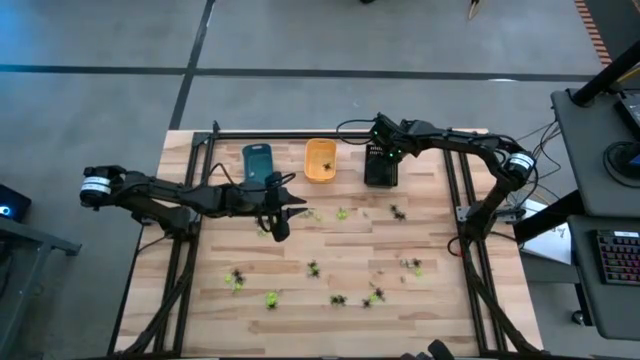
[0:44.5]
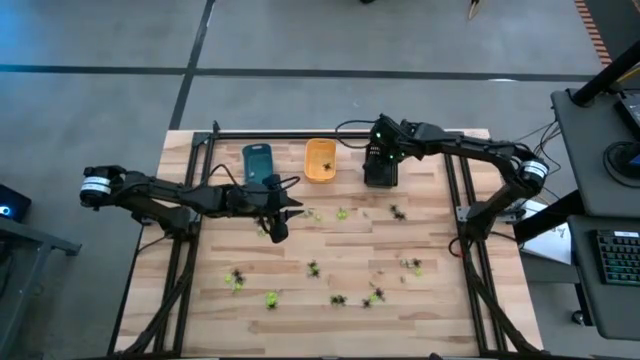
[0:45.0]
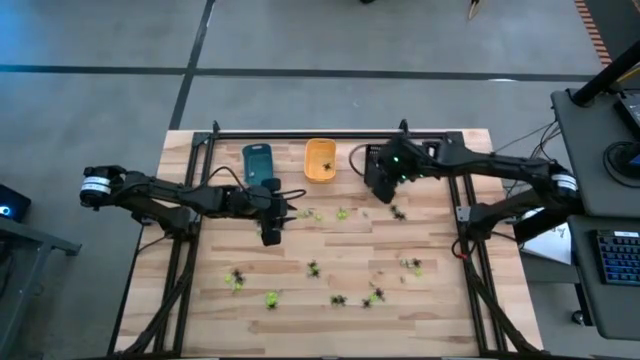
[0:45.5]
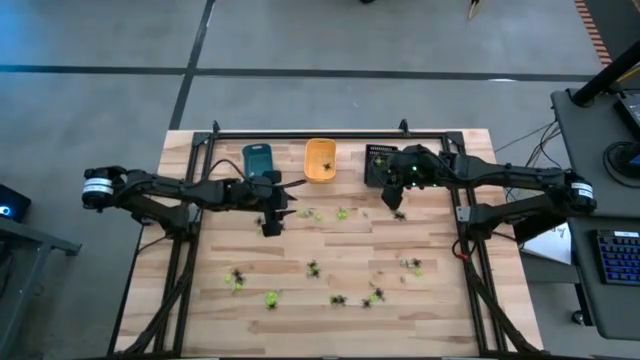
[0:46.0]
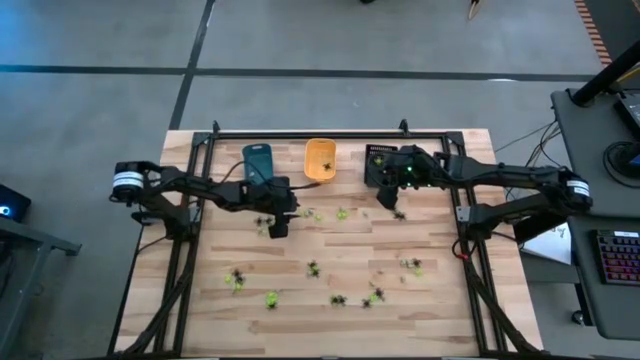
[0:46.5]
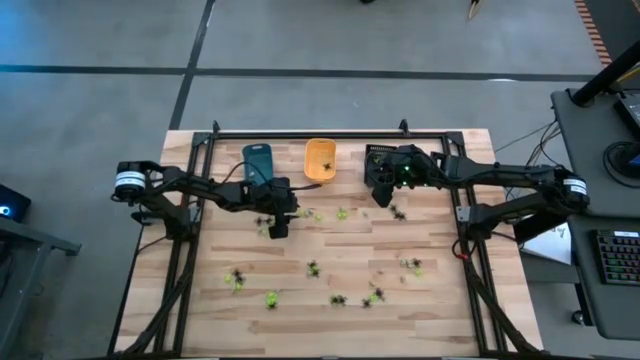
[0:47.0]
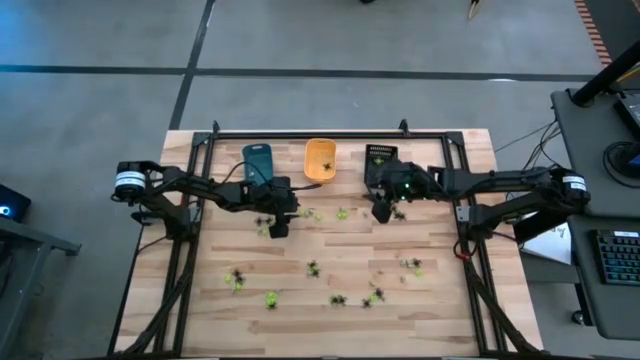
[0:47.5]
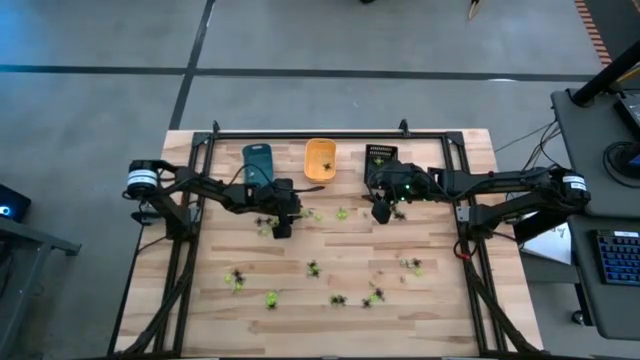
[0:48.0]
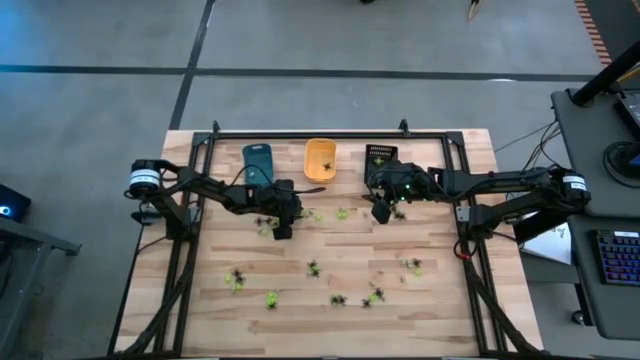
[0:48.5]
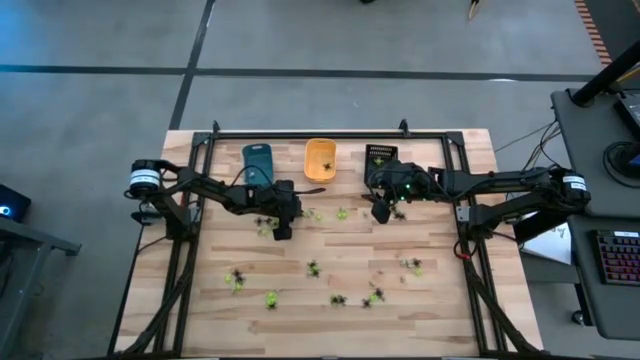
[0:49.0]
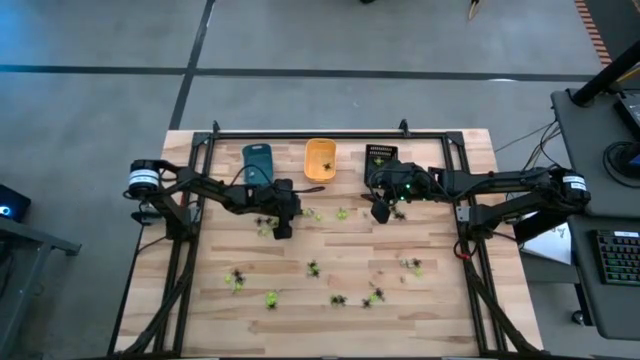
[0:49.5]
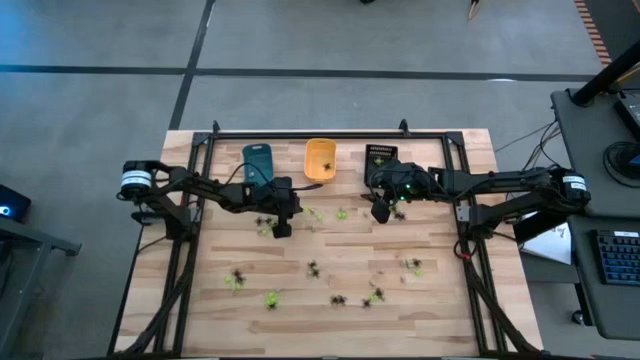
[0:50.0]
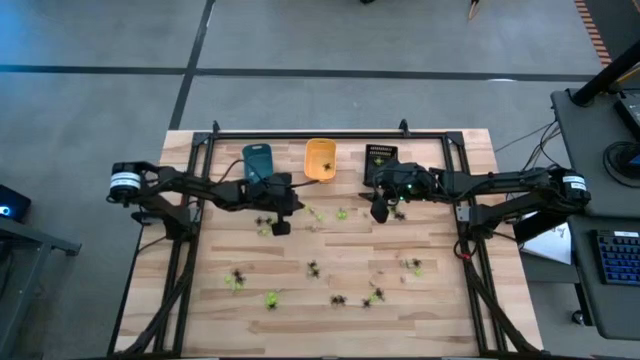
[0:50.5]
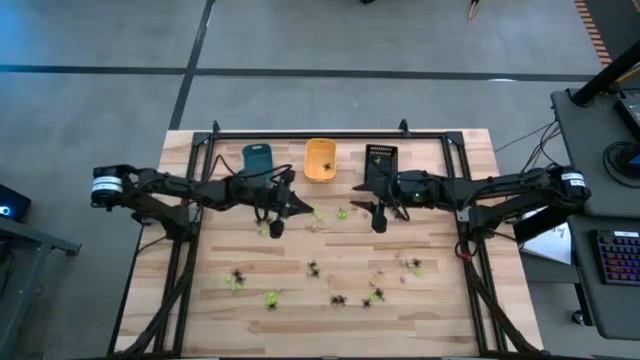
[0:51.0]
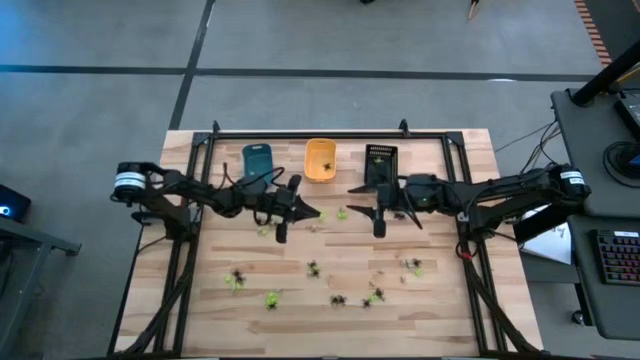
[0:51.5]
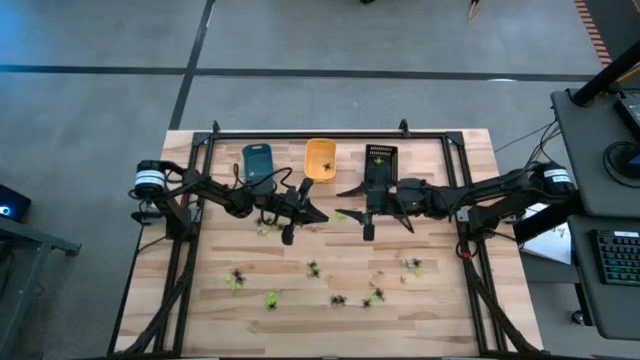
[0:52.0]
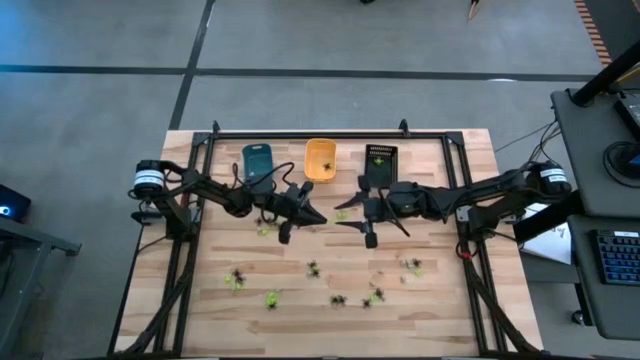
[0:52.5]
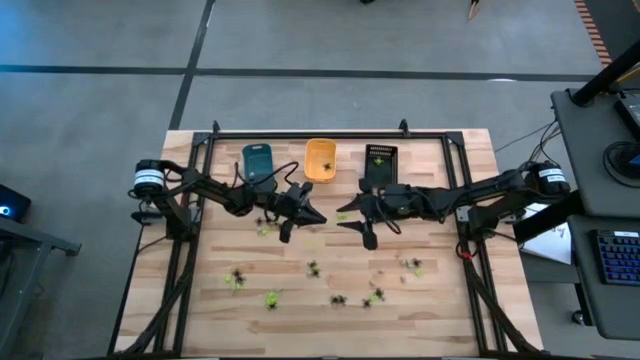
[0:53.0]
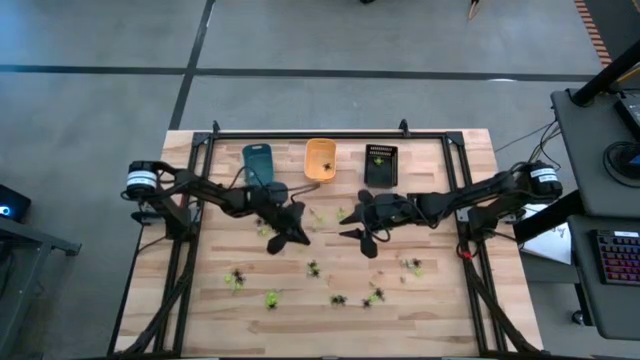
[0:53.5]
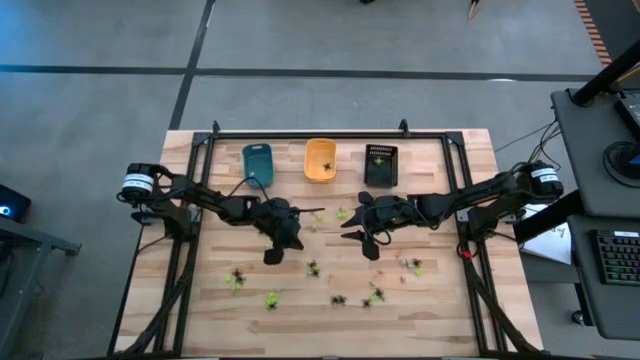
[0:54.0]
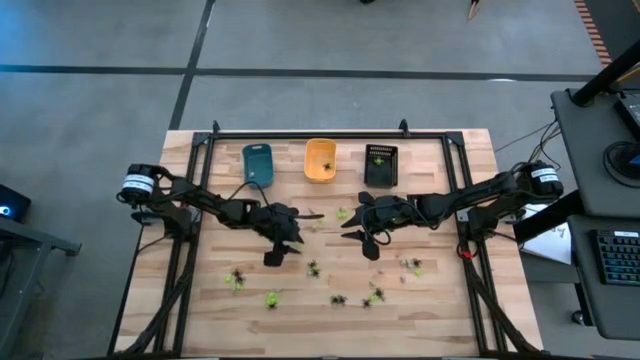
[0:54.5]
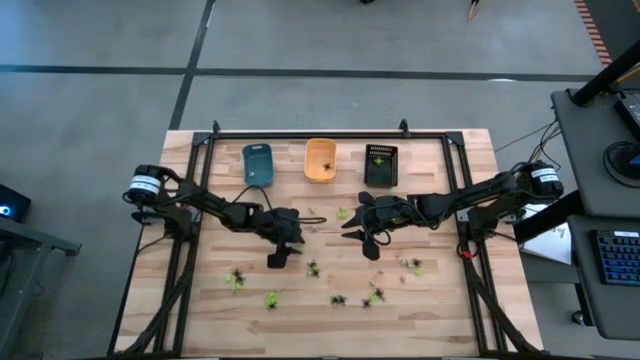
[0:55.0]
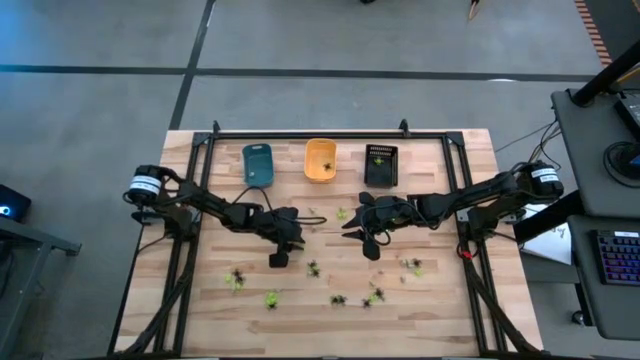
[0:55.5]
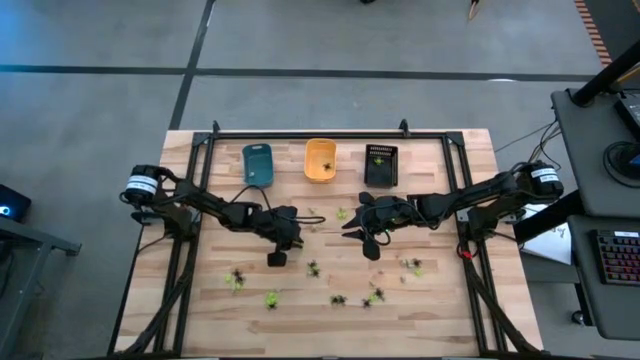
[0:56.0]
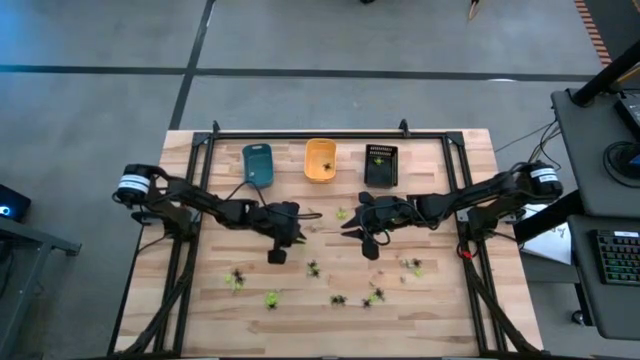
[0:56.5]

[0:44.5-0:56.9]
Task: Sort Halloween decoration
Put the green spider toy into the black bin

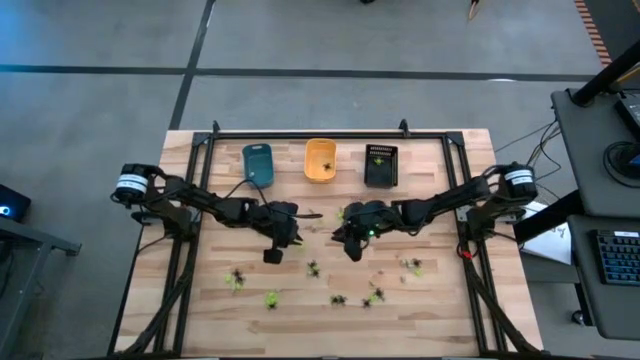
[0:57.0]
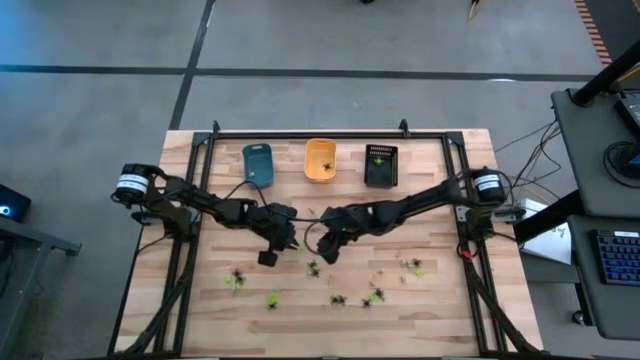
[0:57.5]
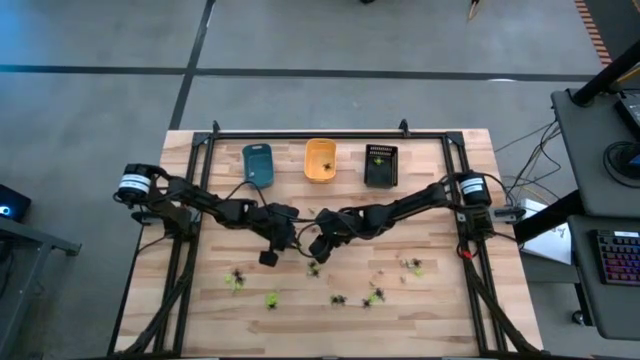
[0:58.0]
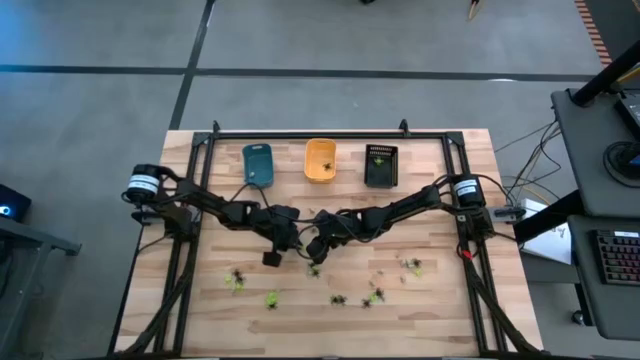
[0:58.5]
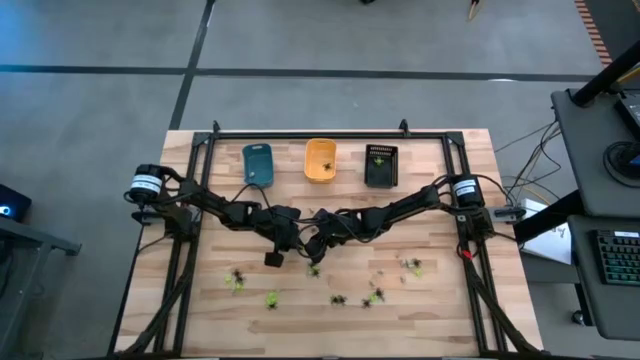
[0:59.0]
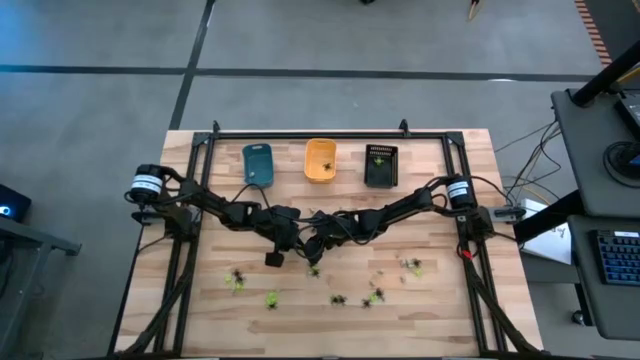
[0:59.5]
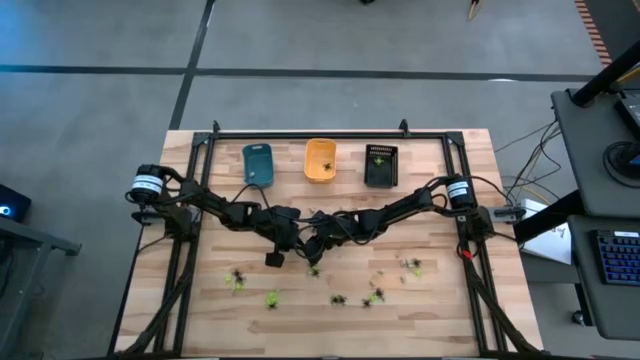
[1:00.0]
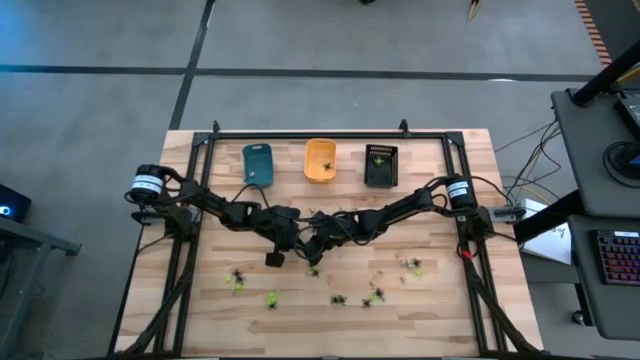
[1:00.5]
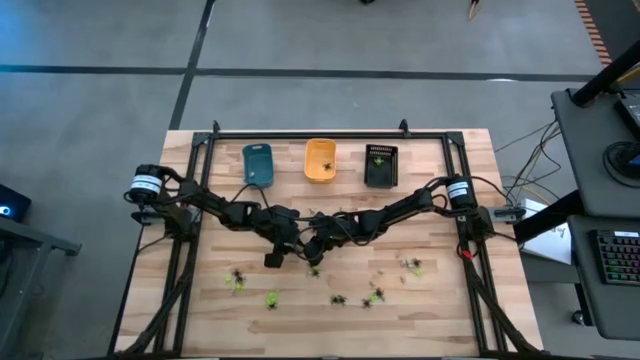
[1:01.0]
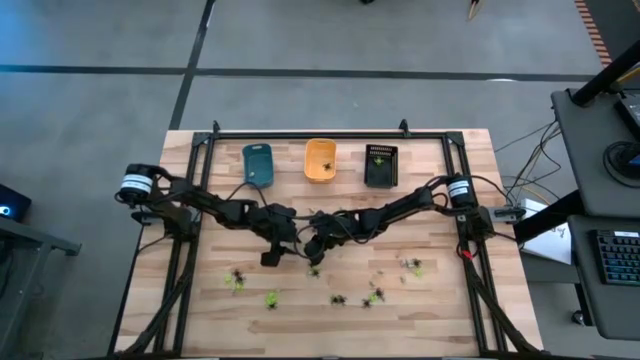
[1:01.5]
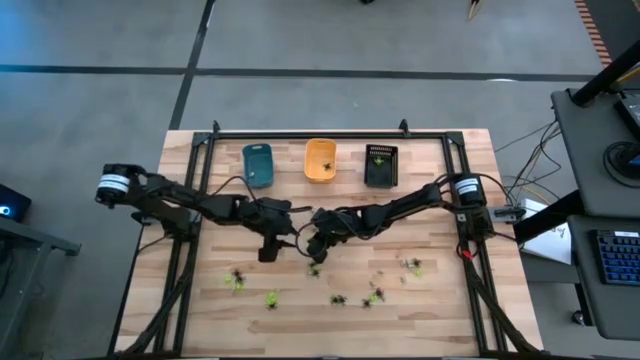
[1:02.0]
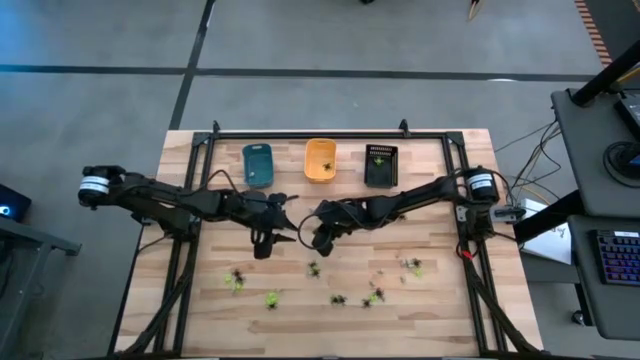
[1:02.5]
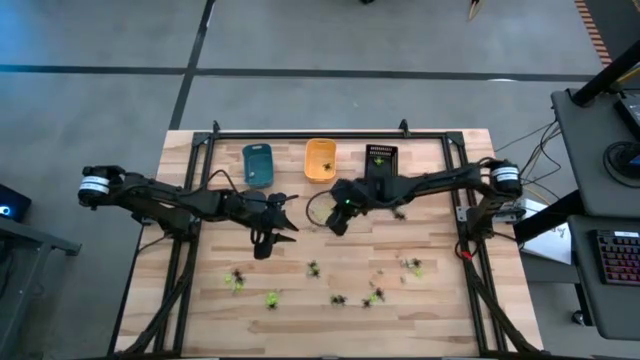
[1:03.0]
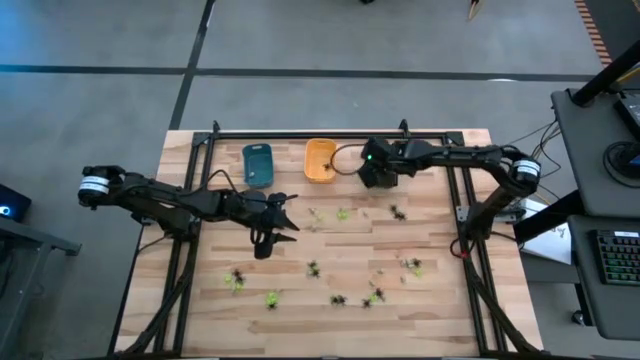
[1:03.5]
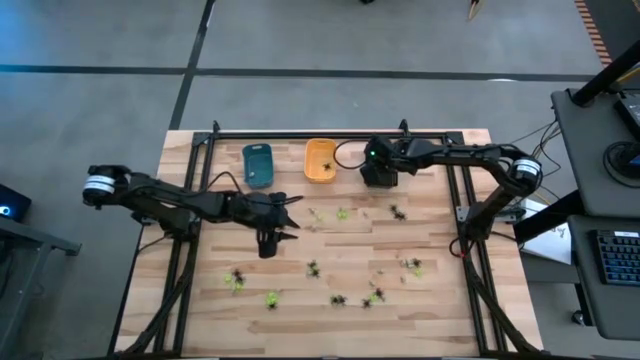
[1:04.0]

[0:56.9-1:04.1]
Put the green spider toy into the black bin

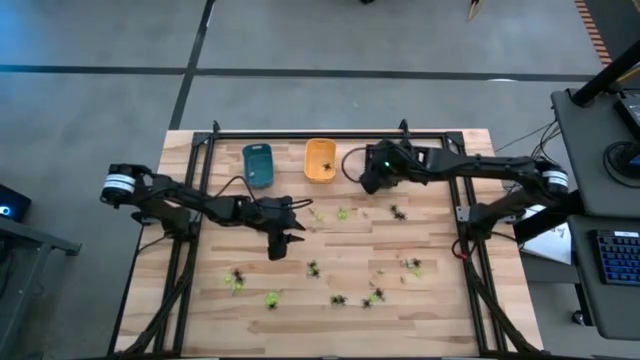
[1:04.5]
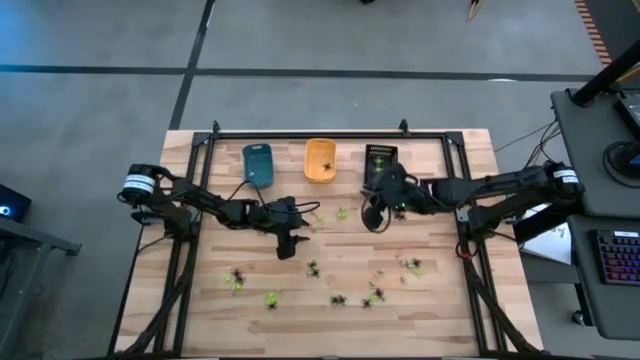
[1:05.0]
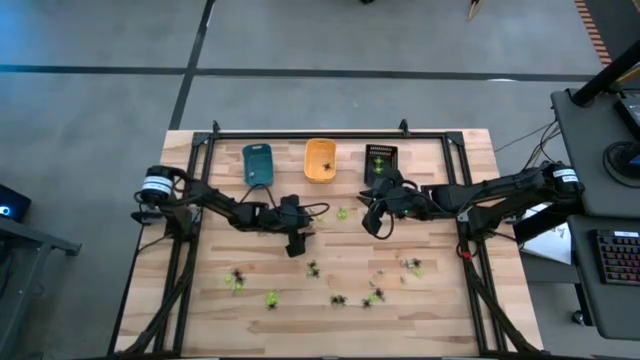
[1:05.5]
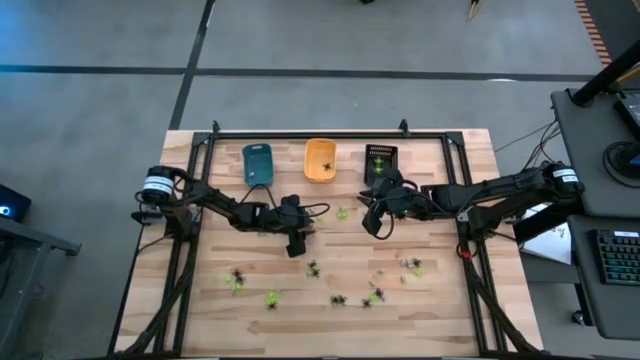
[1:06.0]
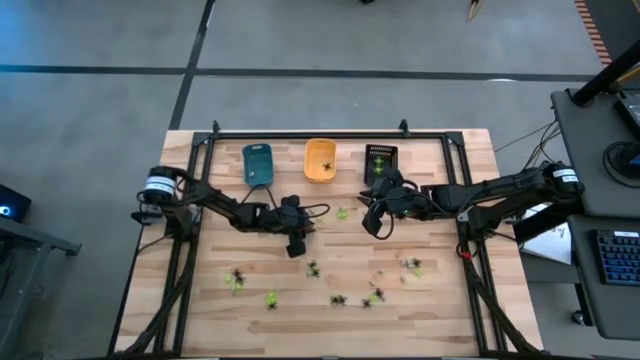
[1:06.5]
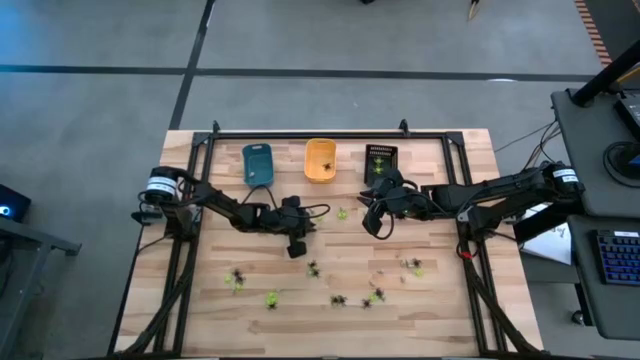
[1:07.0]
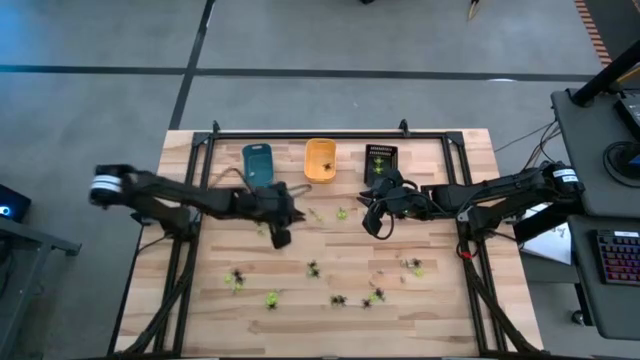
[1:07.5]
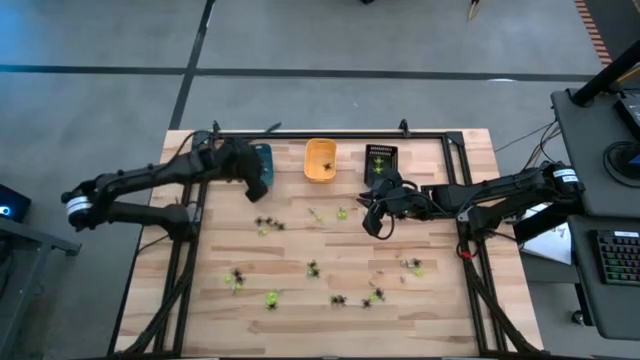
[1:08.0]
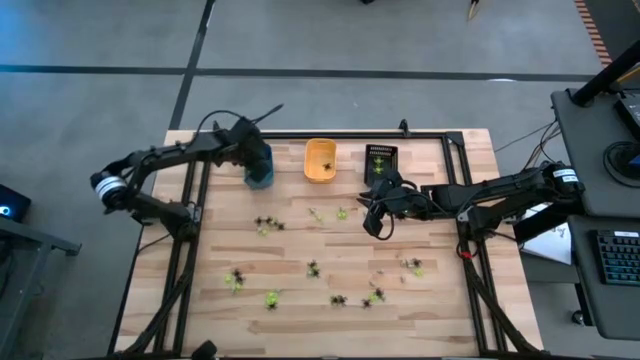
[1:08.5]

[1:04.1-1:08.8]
Put the white skull toy into the blue bin
